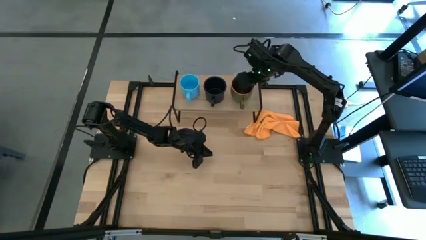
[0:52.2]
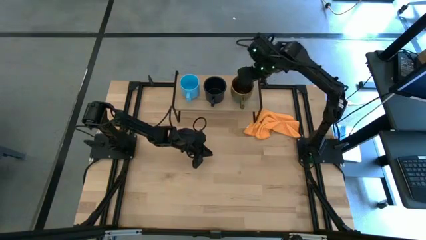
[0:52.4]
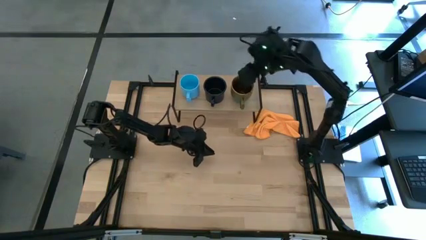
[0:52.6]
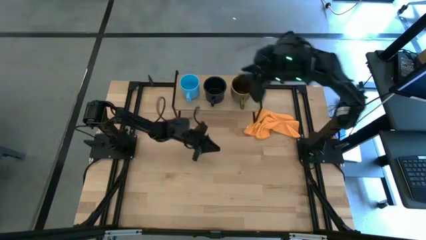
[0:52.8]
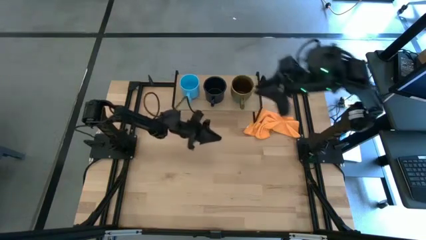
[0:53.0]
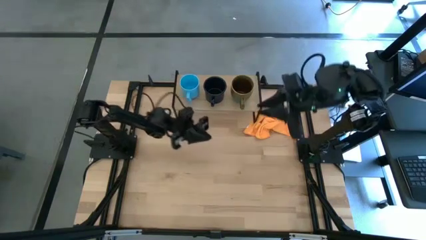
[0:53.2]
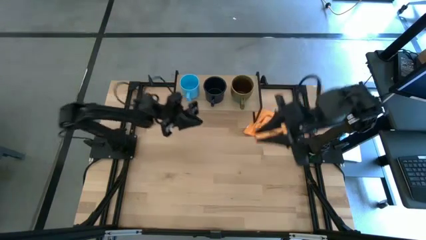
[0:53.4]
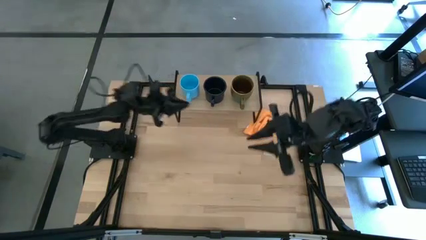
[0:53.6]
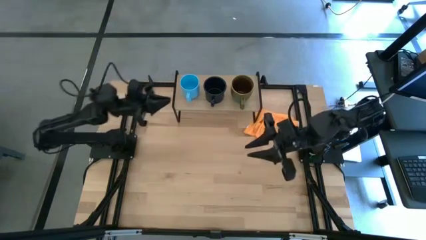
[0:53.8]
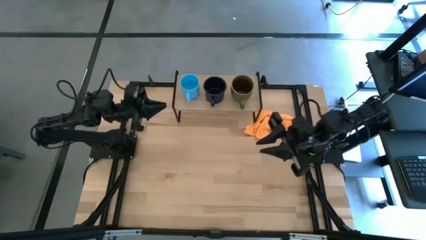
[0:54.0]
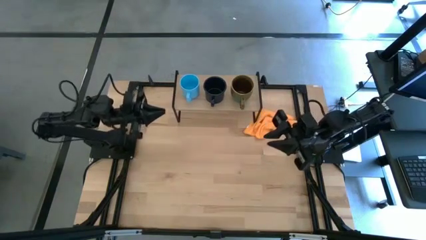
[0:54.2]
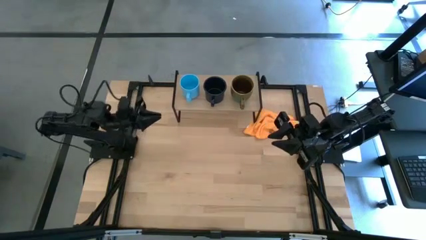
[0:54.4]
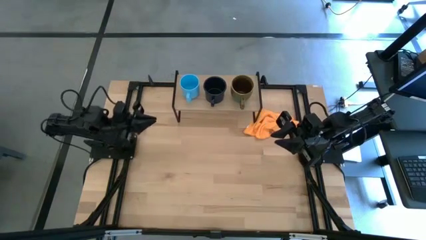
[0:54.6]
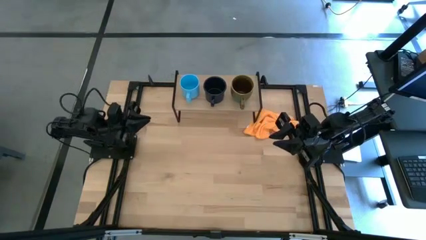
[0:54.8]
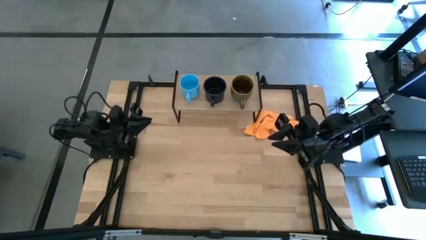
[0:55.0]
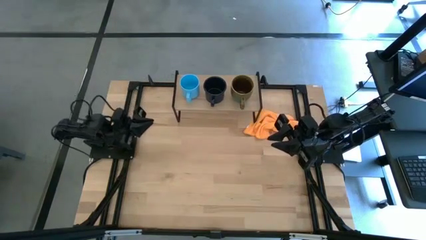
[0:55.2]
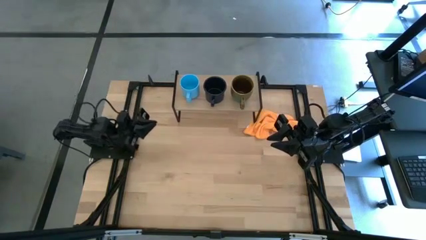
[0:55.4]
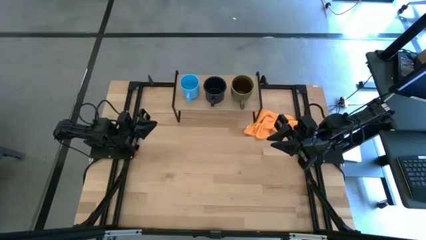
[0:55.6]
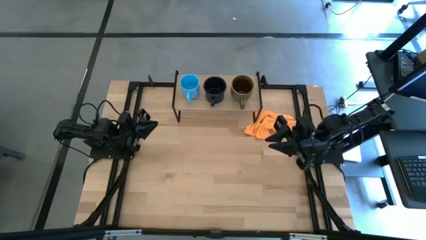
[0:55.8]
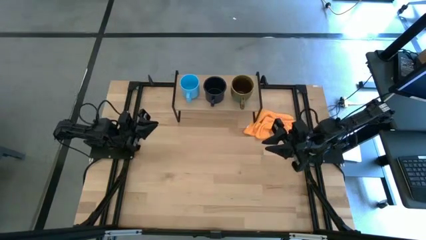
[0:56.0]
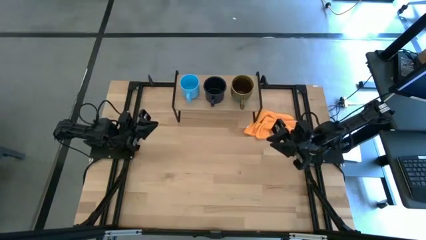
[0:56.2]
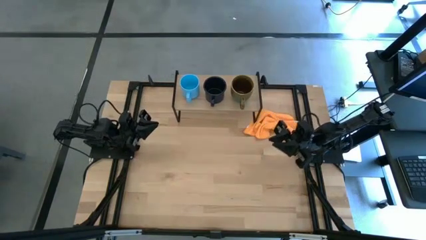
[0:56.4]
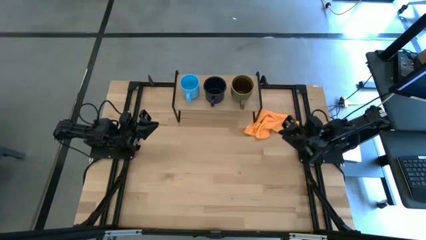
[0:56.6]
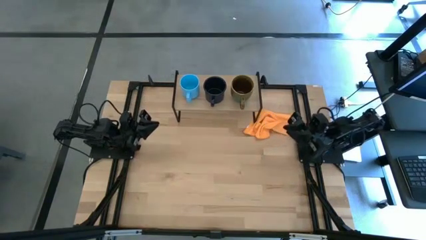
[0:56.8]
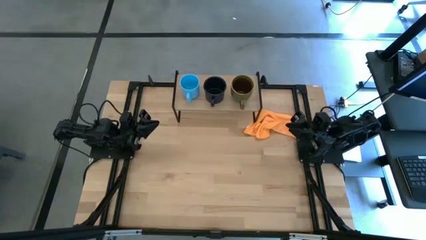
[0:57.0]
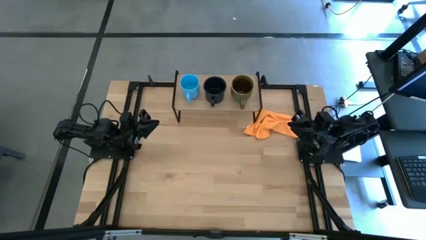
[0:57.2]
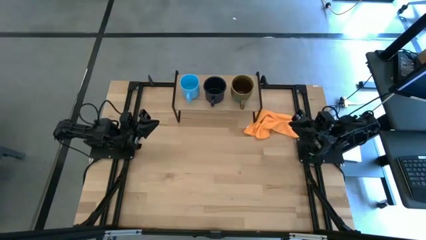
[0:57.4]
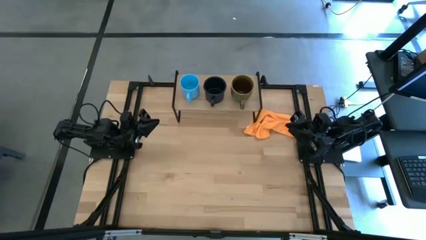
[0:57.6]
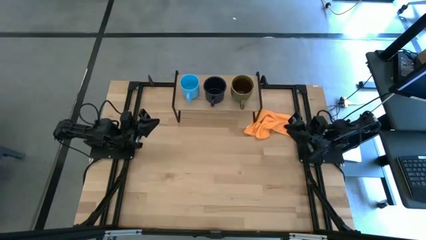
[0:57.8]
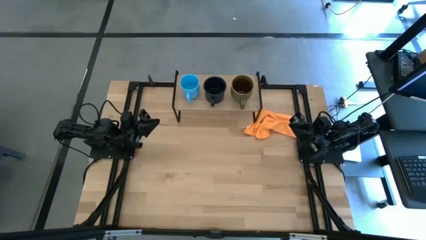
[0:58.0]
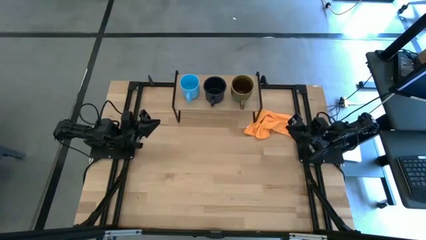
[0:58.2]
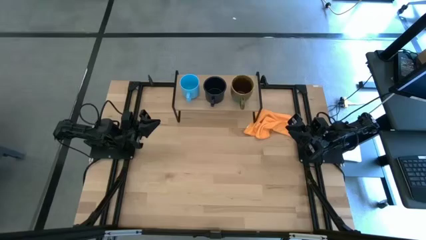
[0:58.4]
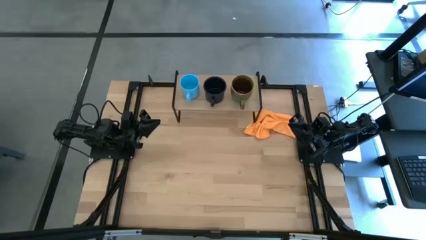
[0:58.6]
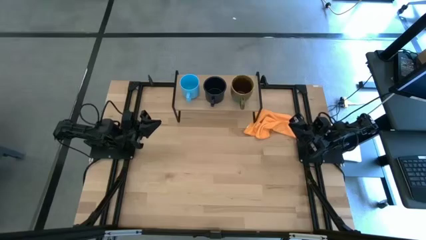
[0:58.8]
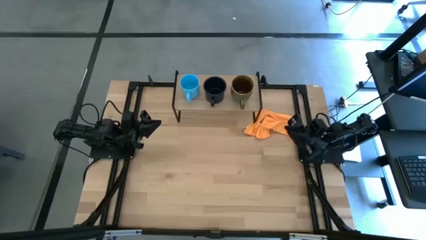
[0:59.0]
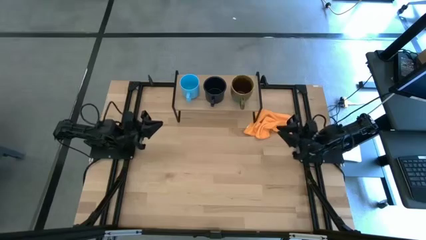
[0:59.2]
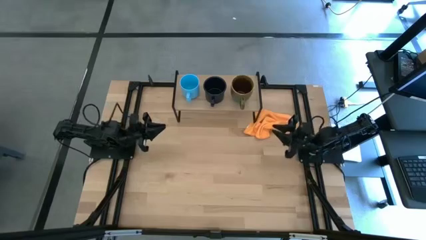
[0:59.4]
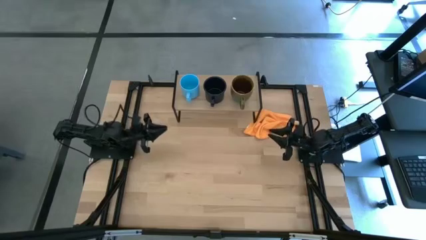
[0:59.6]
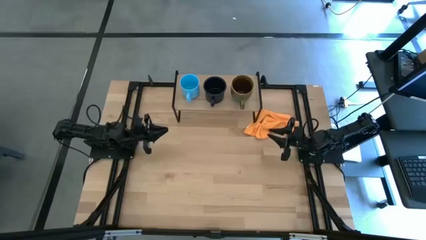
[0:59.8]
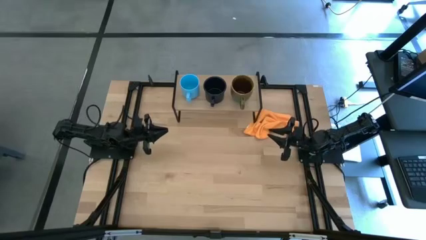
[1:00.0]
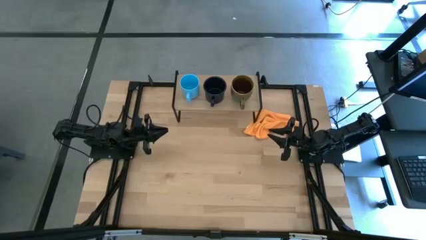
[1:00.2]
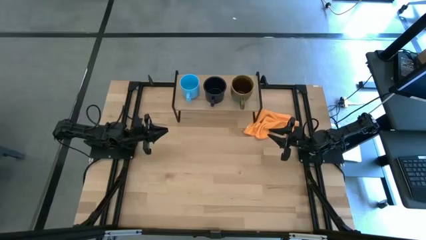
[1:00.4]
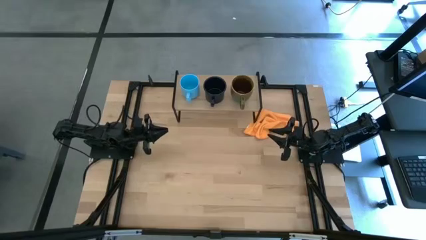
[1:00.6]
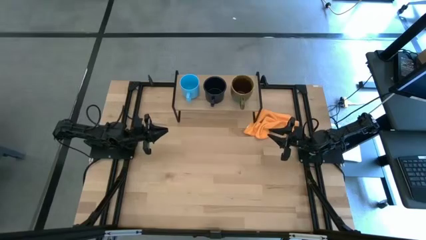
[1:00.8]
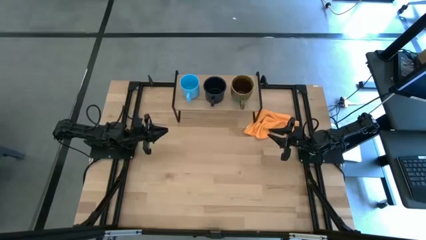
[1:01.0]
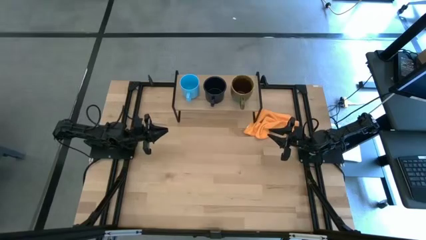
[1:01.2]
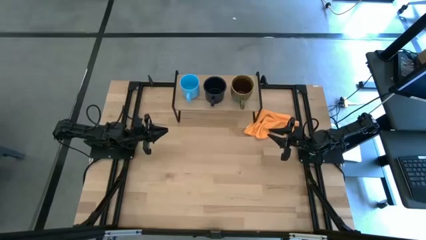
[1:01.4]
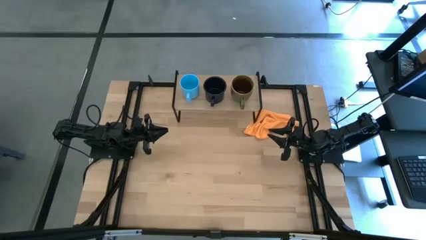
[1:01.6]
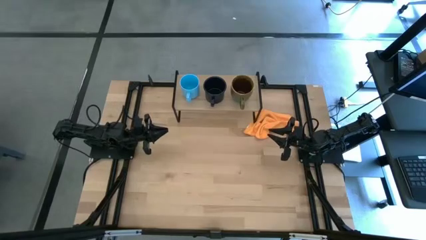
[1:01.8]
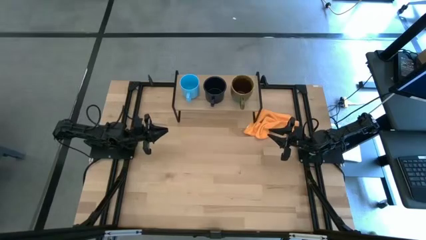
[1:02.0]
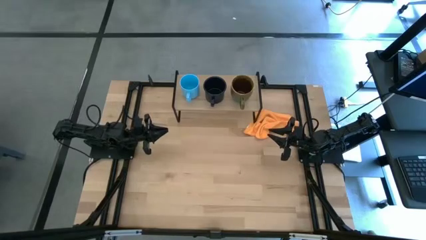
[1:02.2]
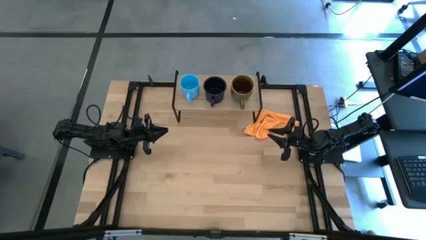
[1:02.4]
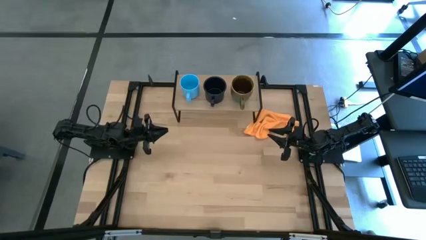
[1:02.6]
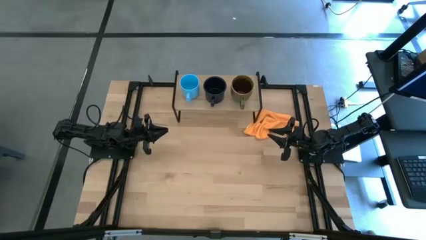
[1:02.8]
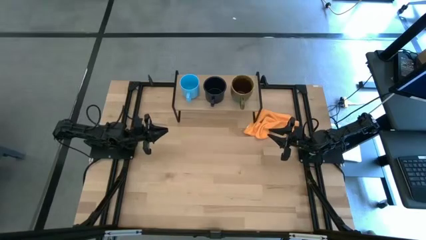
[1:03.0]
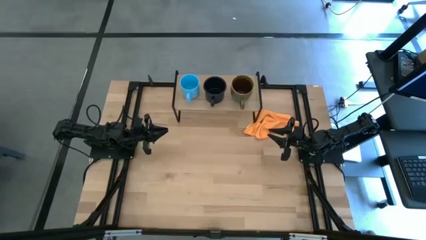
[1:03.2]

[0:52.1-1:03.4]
Task: Stack small to large cups/mugs on shelf
Return to Home Position
